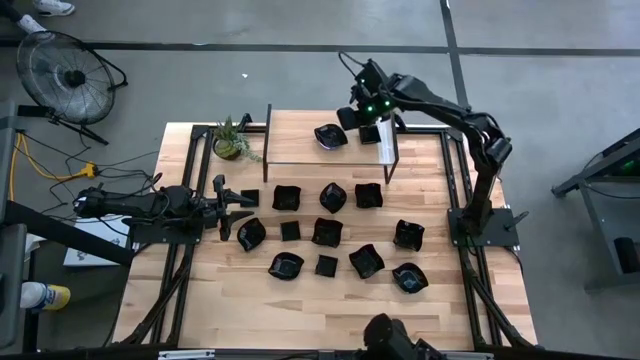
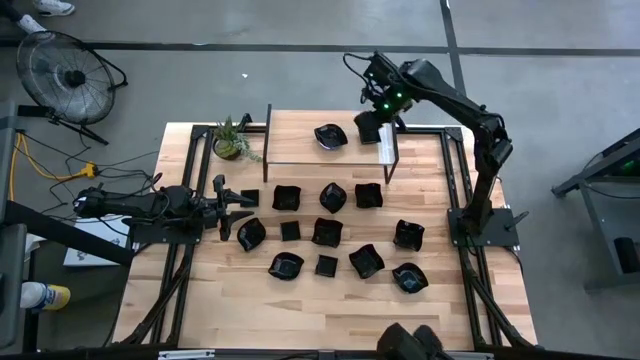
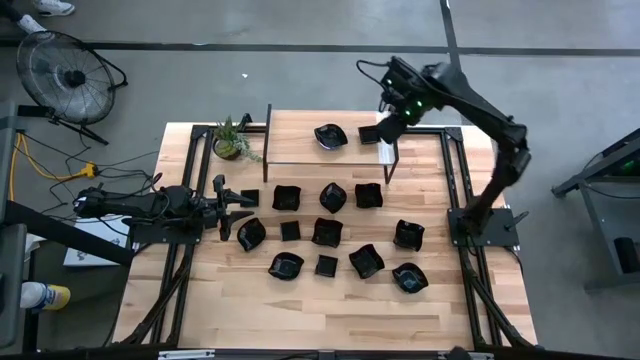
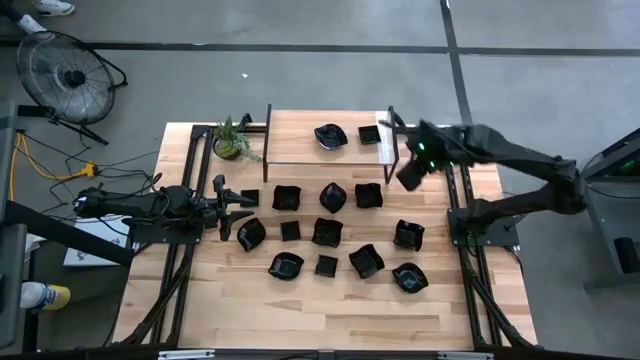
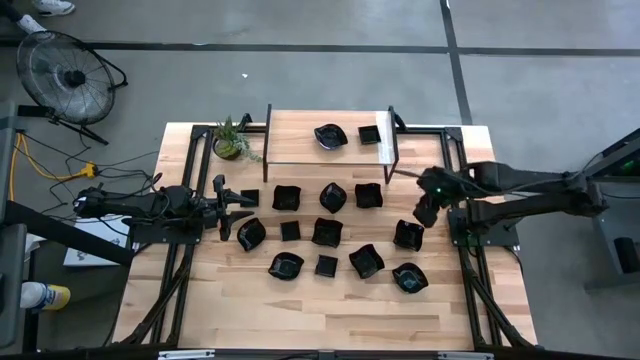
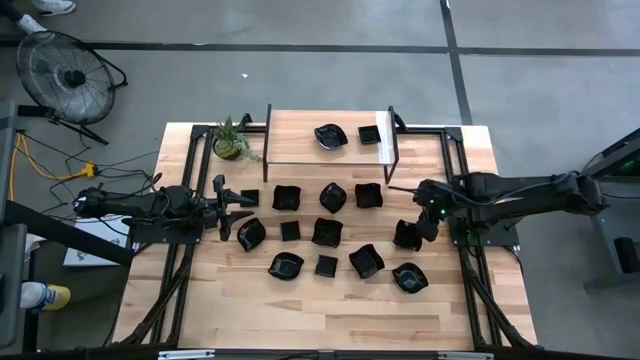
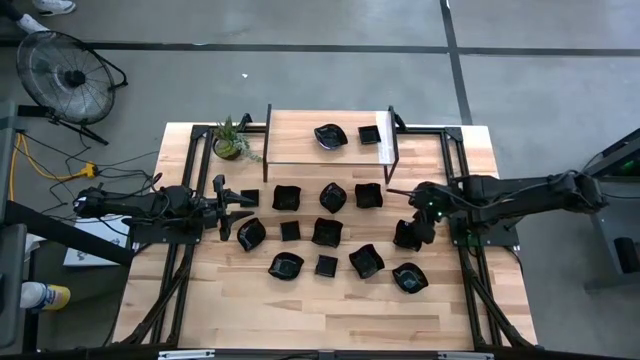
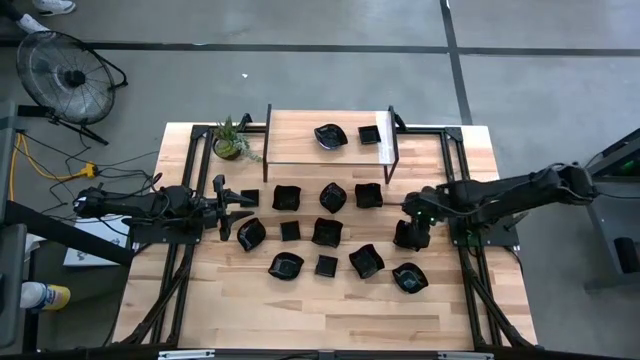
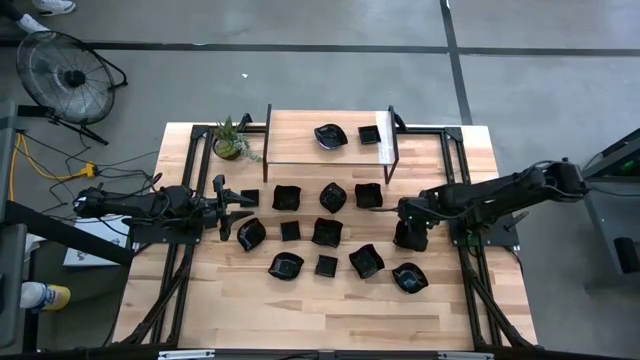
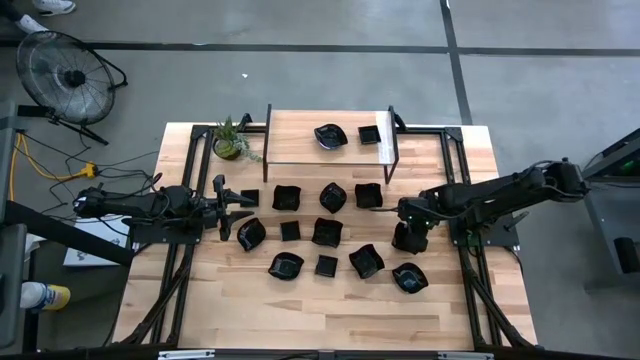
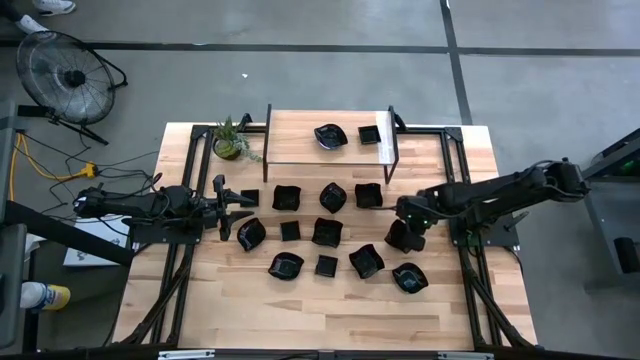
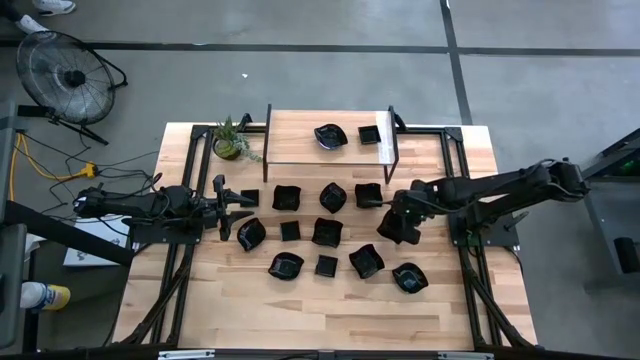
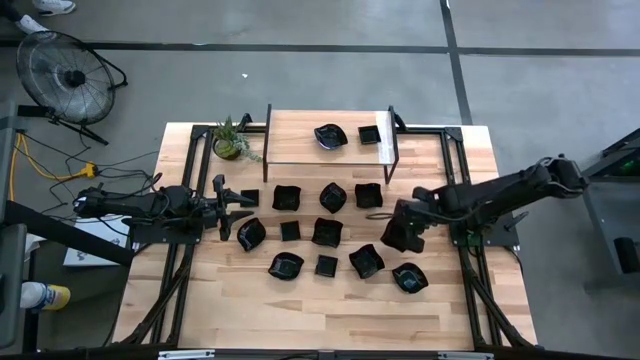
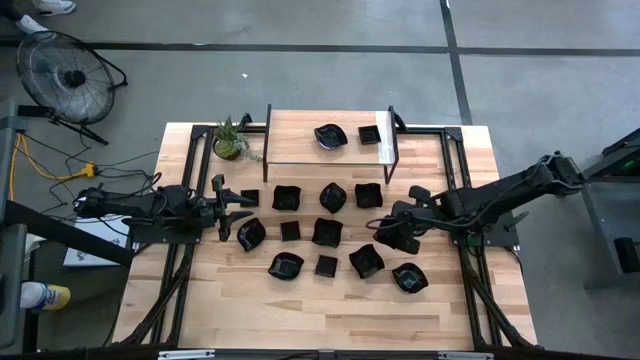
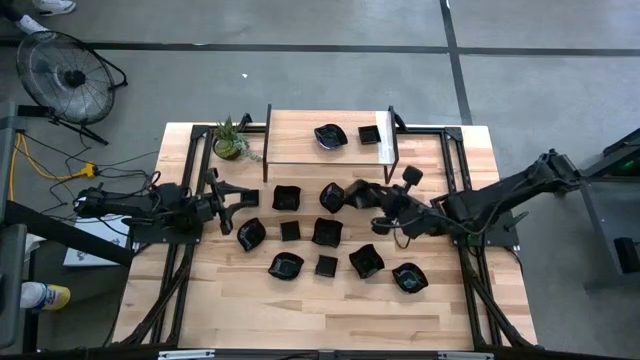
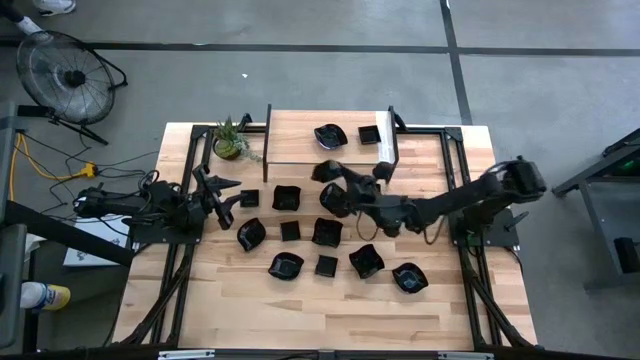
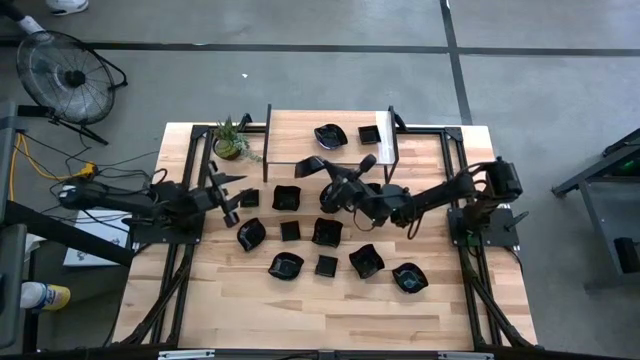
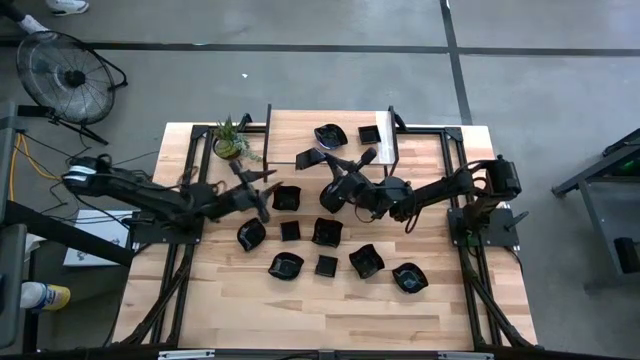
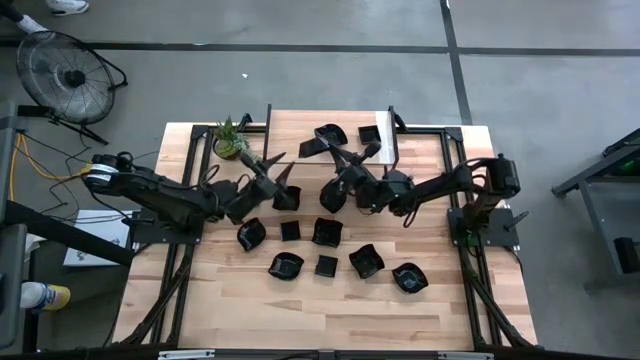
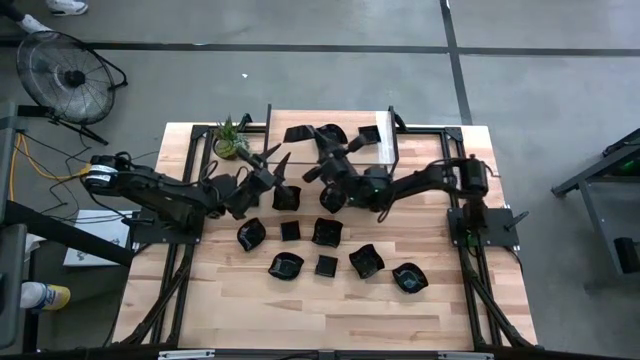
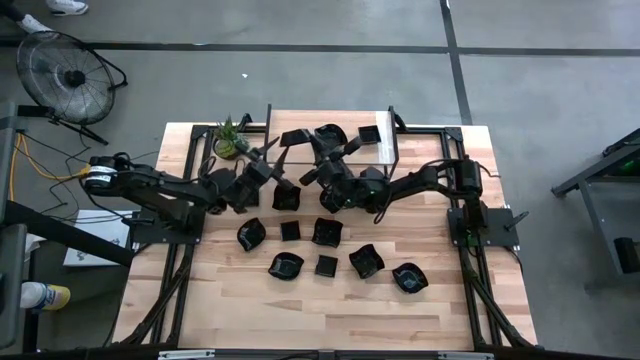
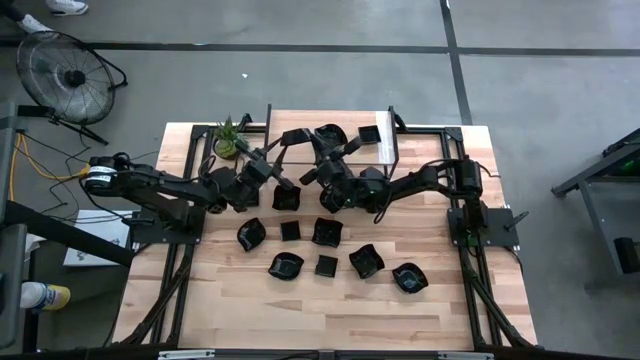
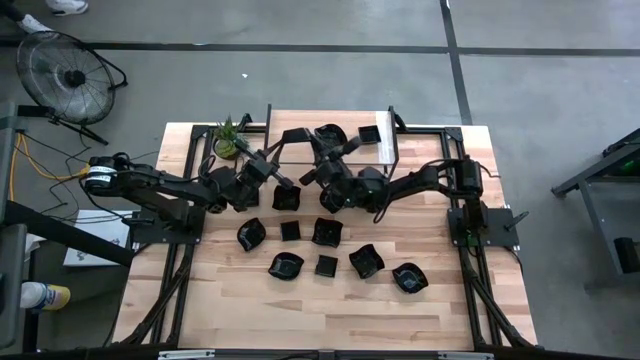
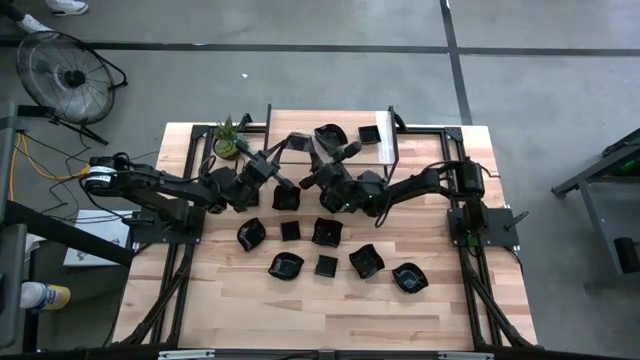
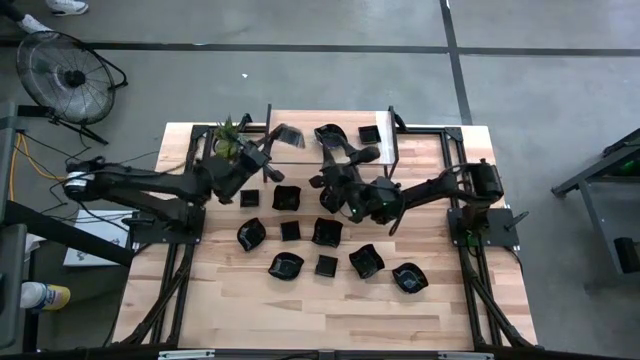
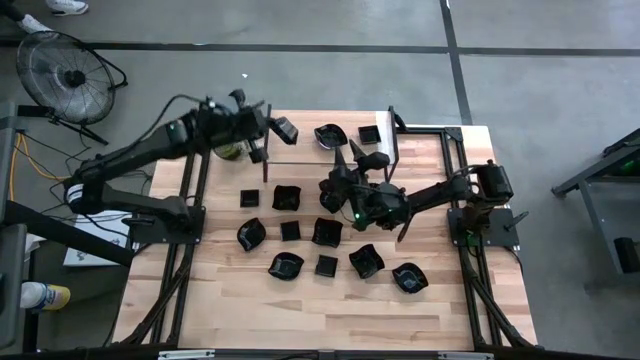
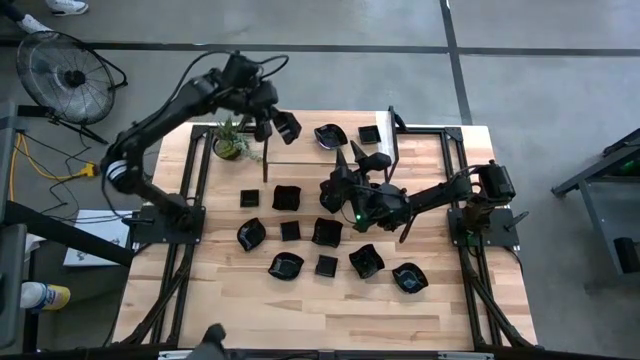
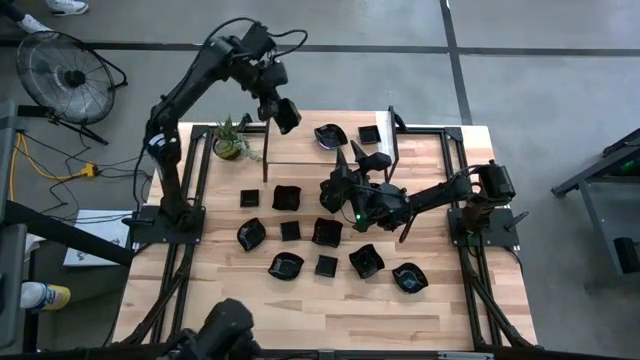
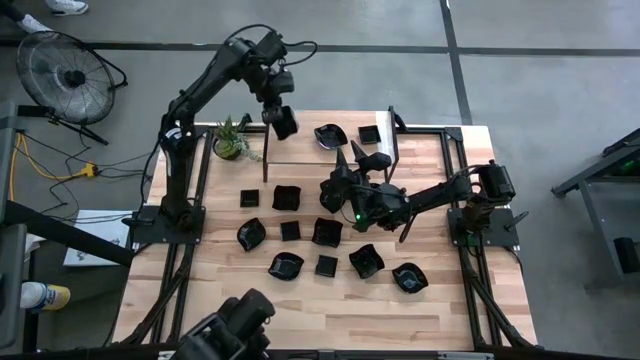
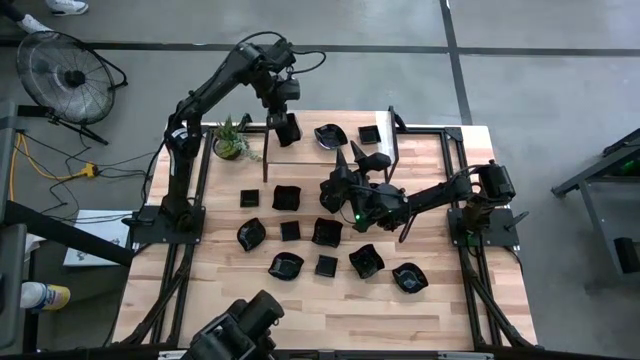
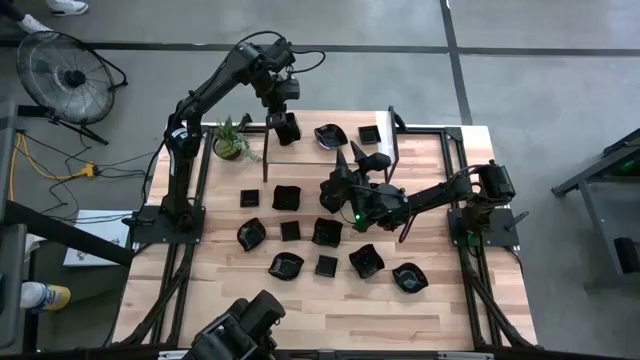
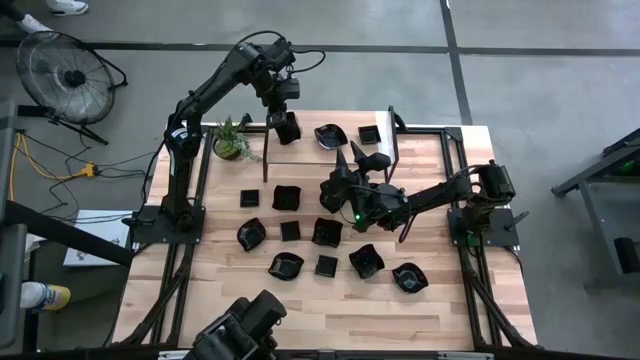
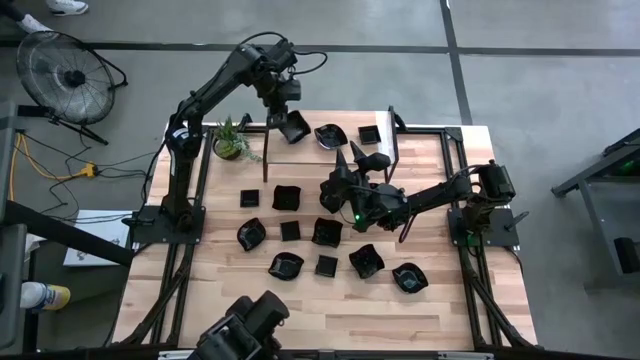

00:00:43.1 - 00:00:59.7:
Task: Pick & Place Mini shaped plates
Put the black distorted square plate on the shelf

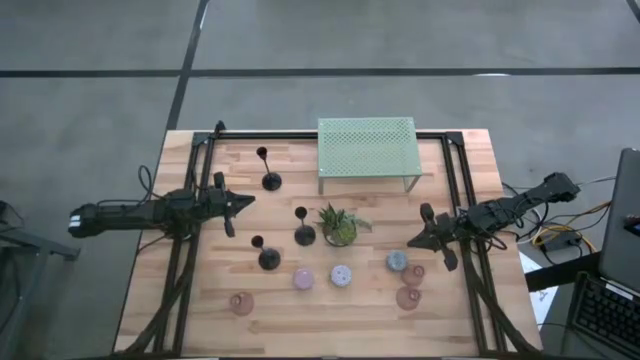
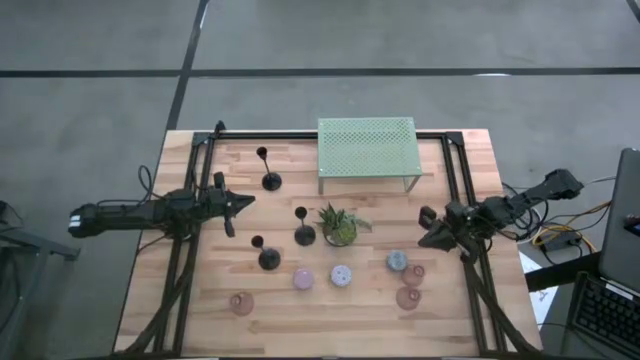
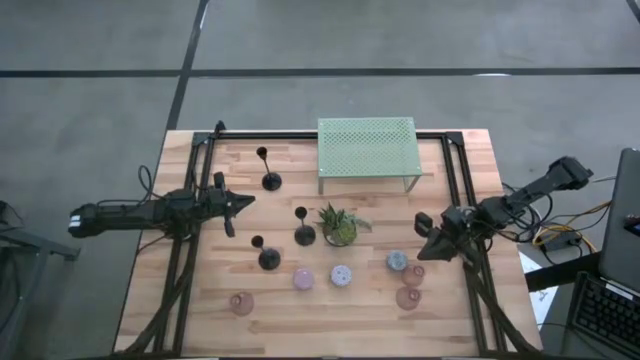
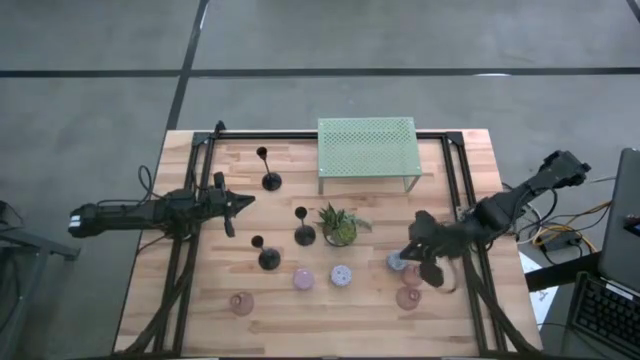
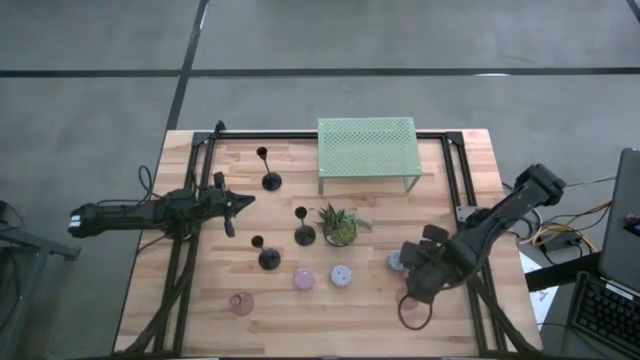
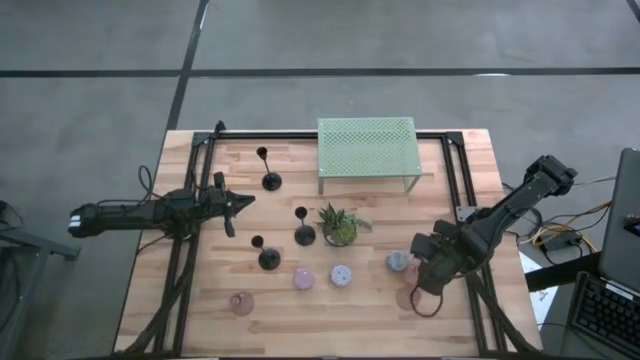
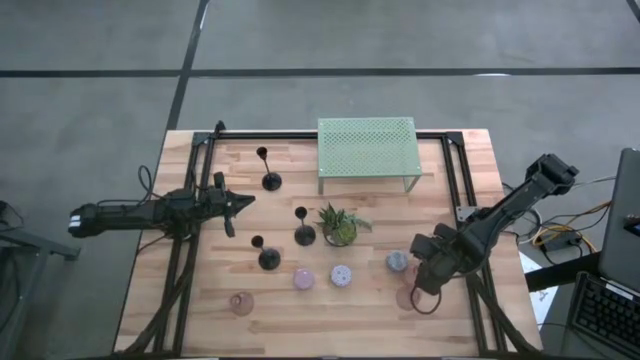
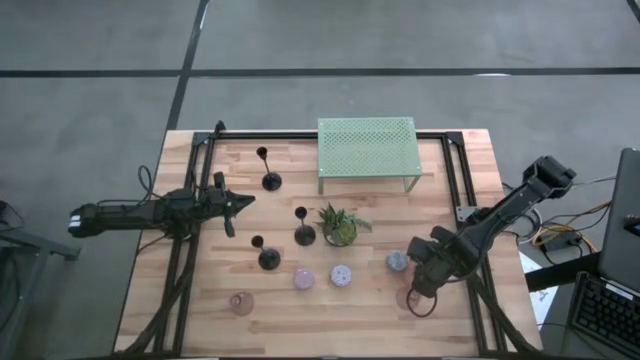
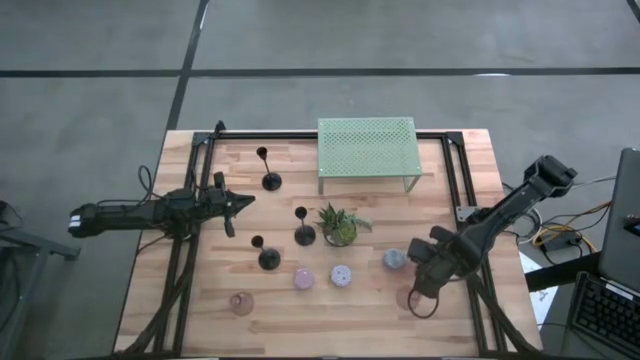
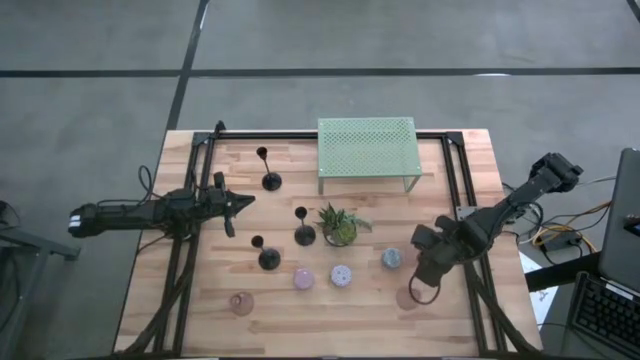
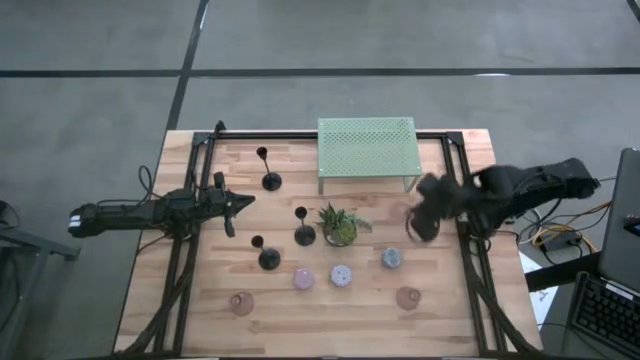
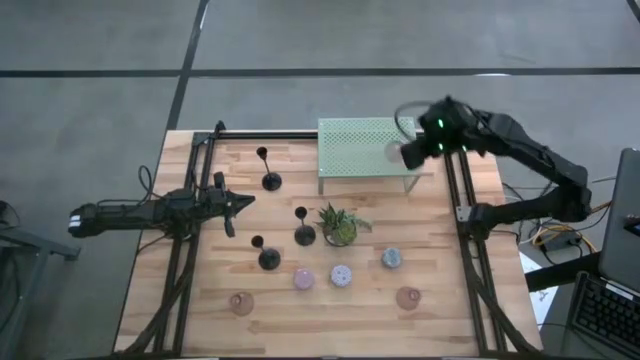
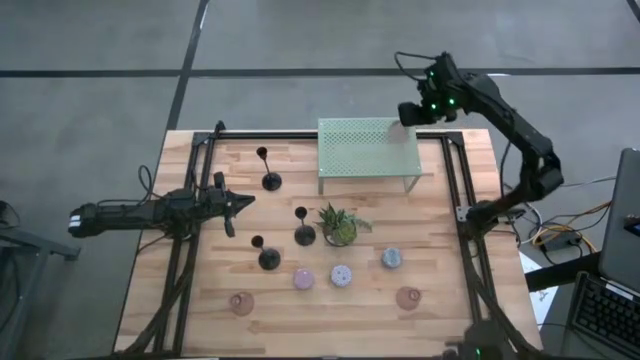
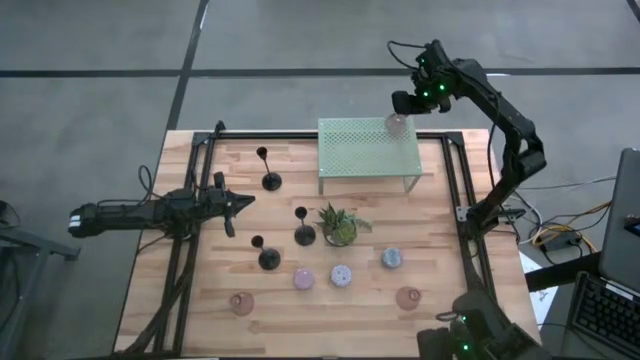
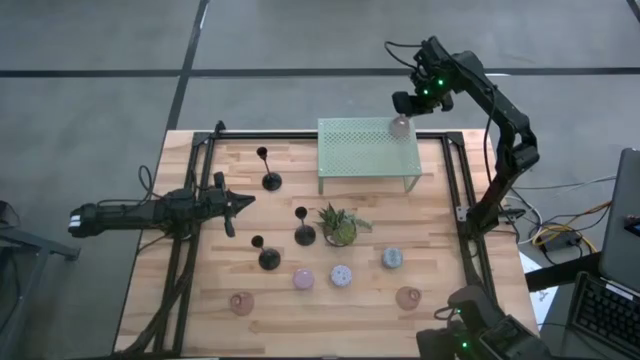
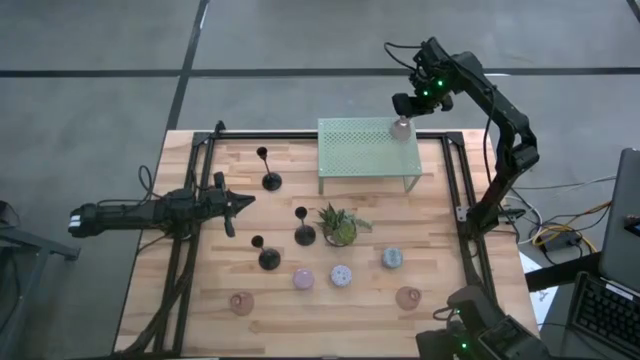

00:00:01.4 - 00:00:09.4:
Task: Pick & Place candle stick holders
Put the top glass candle holder on the shelf
